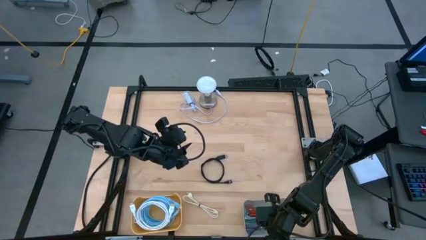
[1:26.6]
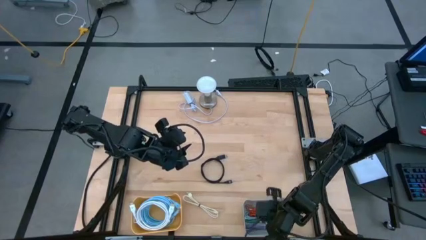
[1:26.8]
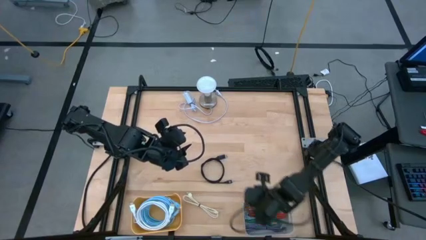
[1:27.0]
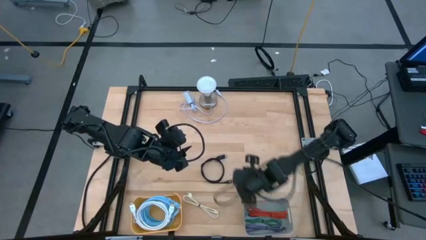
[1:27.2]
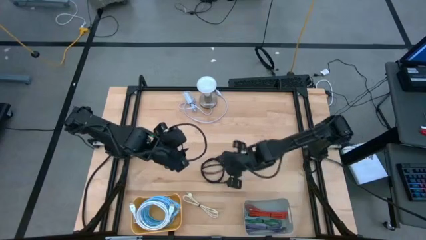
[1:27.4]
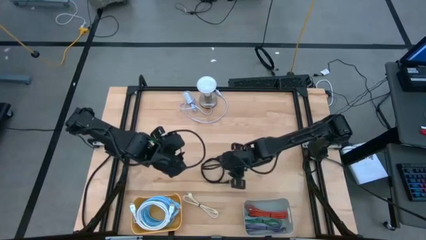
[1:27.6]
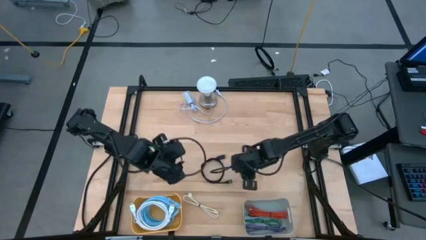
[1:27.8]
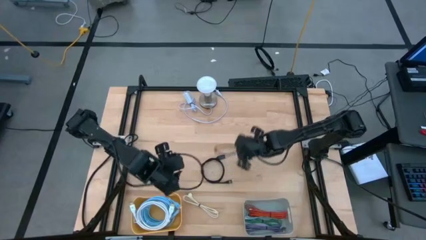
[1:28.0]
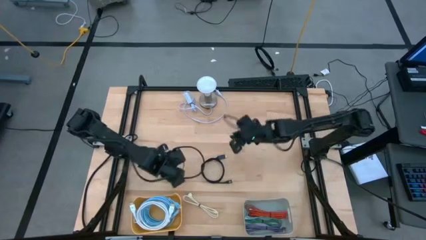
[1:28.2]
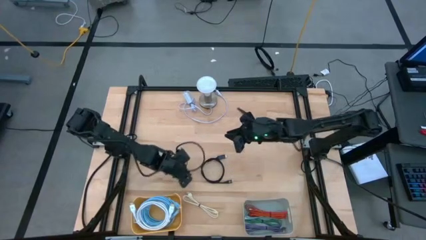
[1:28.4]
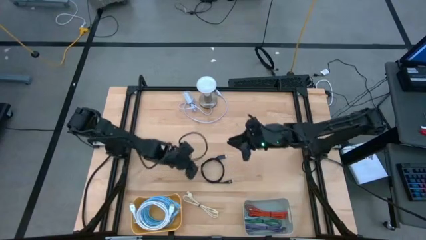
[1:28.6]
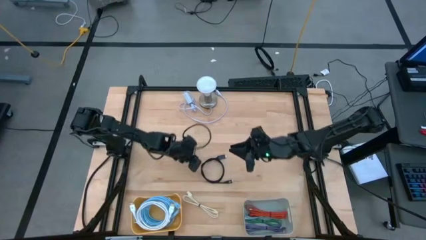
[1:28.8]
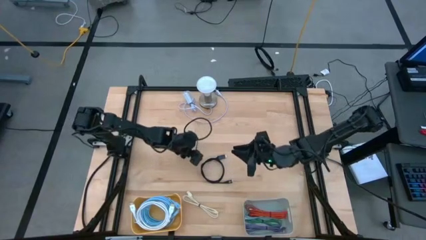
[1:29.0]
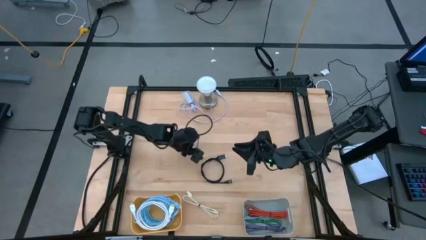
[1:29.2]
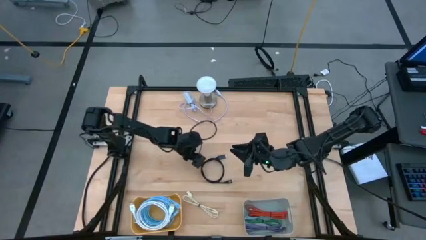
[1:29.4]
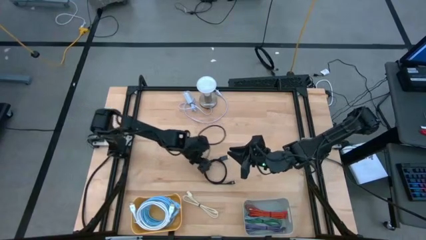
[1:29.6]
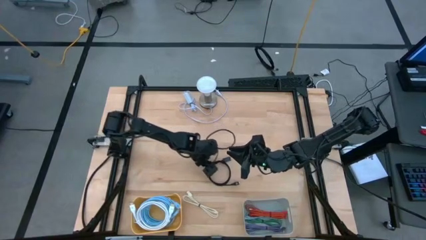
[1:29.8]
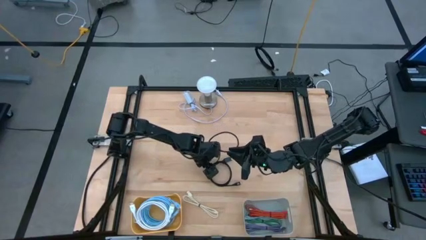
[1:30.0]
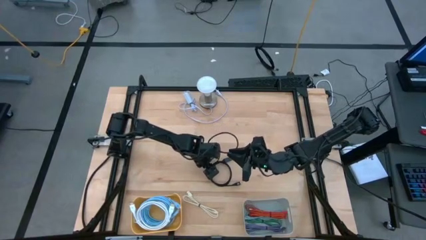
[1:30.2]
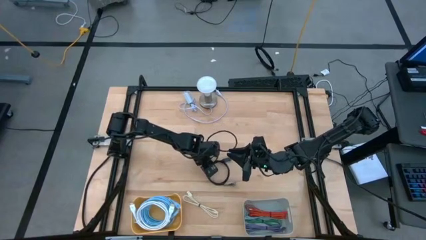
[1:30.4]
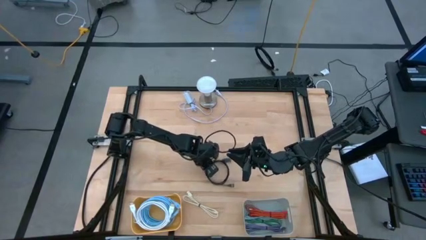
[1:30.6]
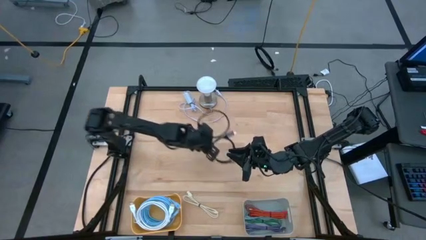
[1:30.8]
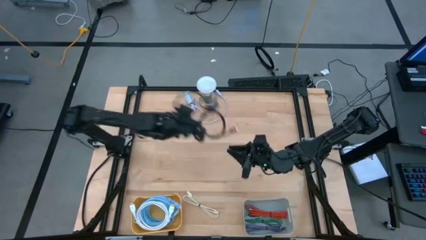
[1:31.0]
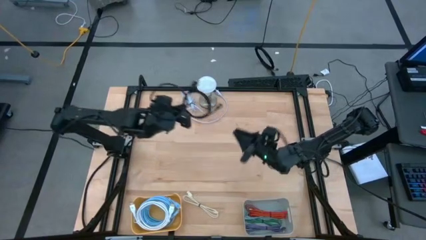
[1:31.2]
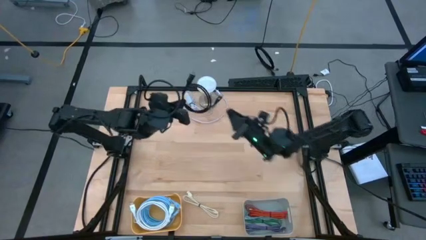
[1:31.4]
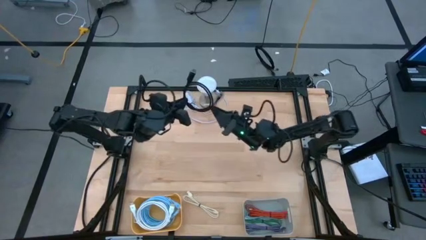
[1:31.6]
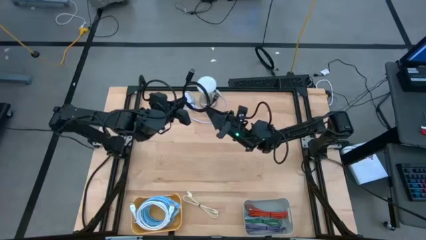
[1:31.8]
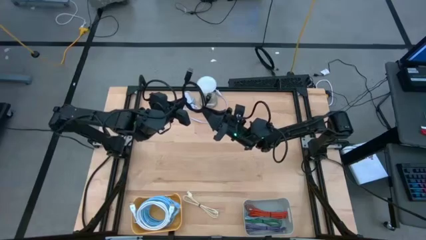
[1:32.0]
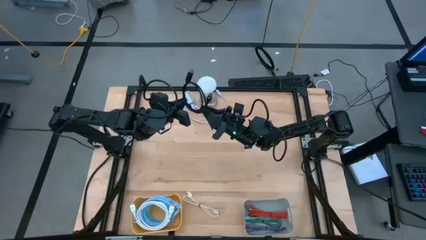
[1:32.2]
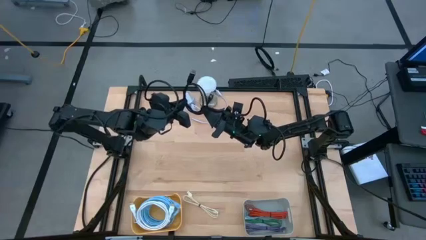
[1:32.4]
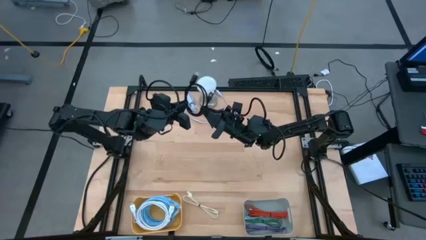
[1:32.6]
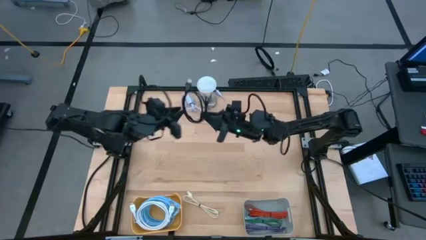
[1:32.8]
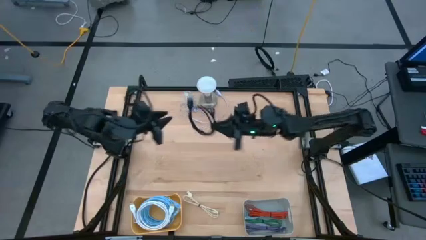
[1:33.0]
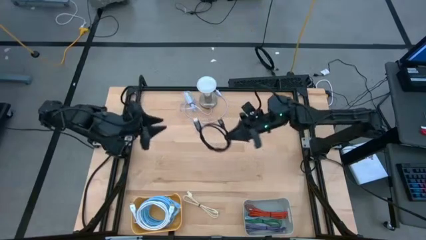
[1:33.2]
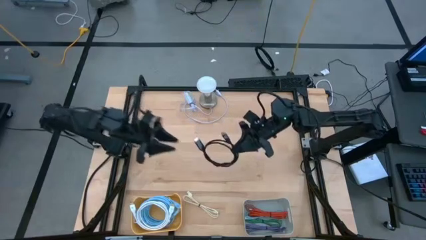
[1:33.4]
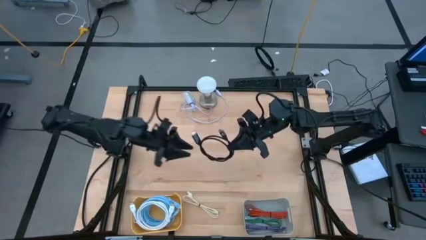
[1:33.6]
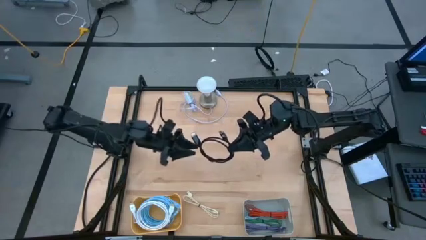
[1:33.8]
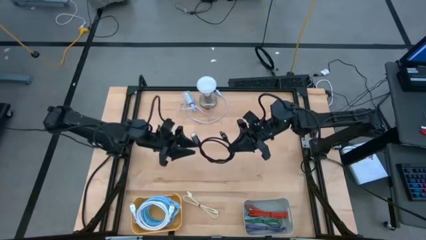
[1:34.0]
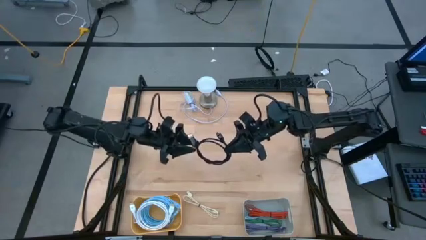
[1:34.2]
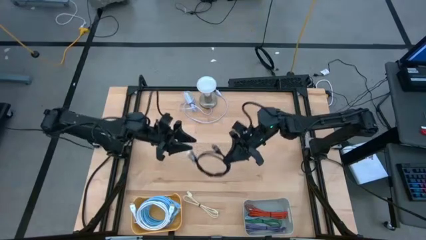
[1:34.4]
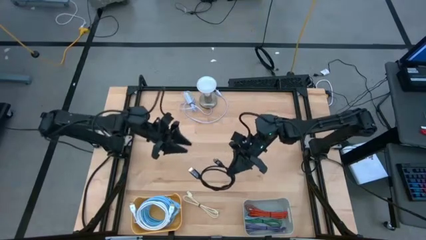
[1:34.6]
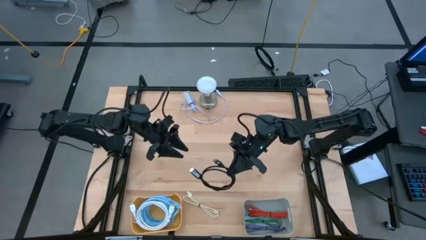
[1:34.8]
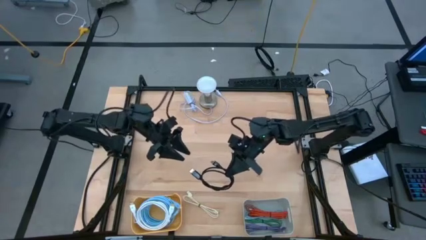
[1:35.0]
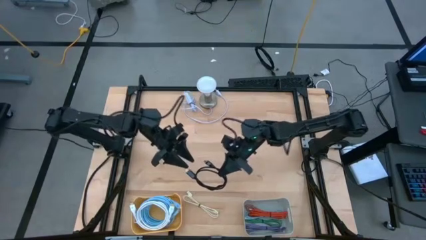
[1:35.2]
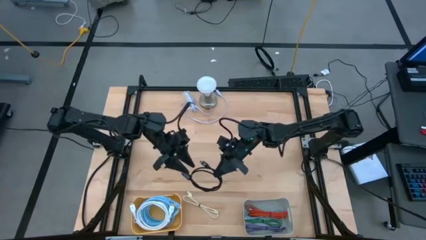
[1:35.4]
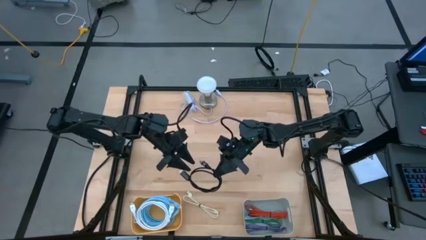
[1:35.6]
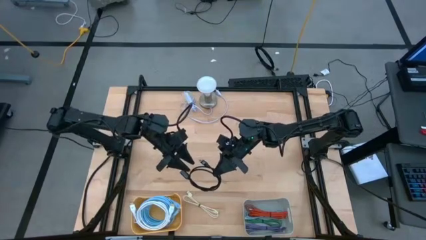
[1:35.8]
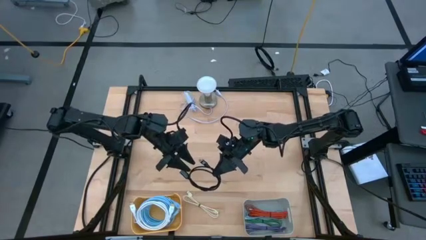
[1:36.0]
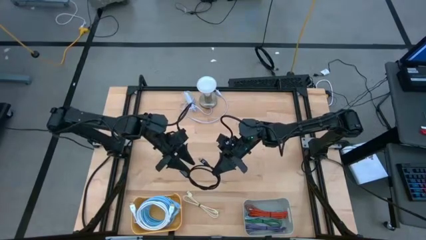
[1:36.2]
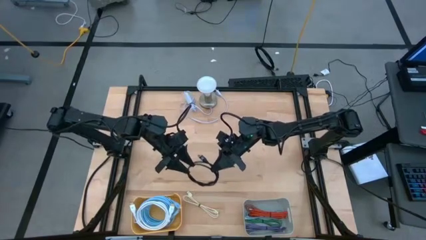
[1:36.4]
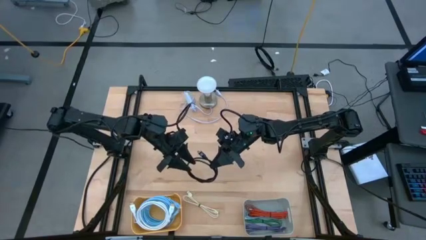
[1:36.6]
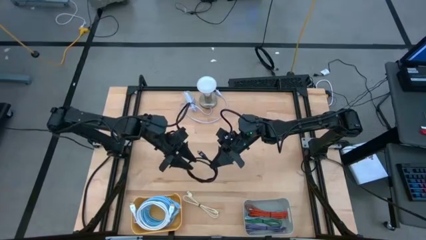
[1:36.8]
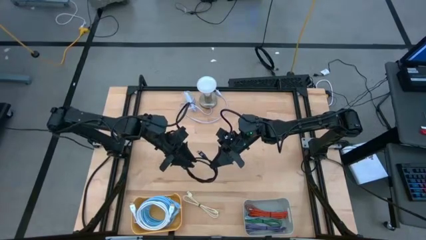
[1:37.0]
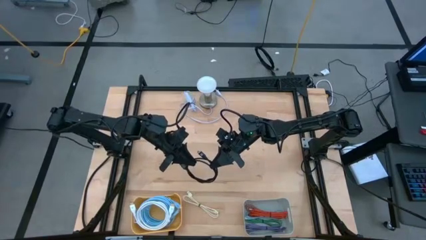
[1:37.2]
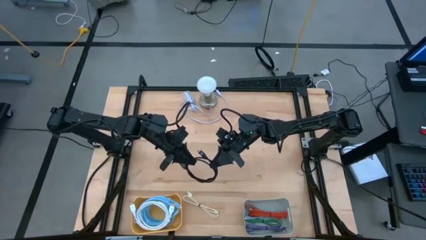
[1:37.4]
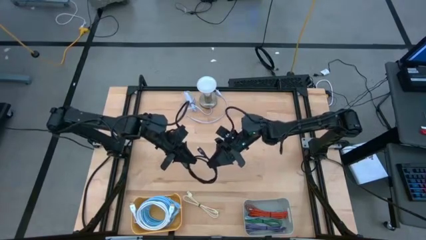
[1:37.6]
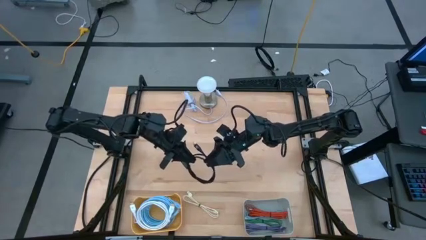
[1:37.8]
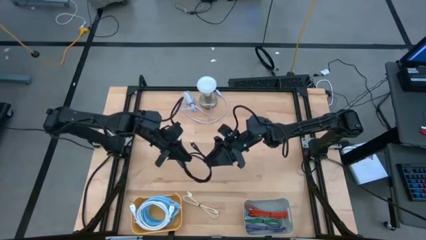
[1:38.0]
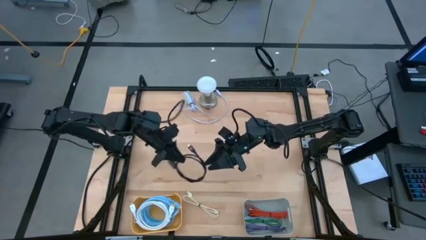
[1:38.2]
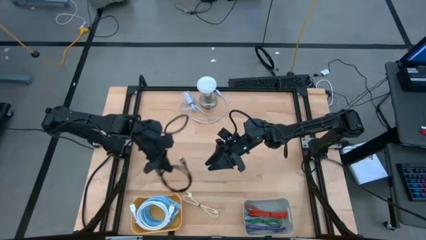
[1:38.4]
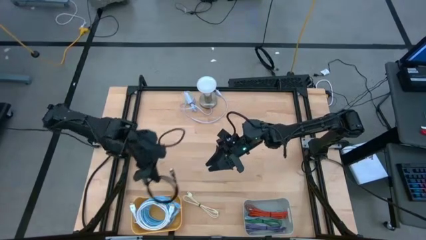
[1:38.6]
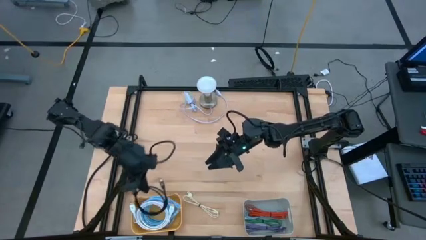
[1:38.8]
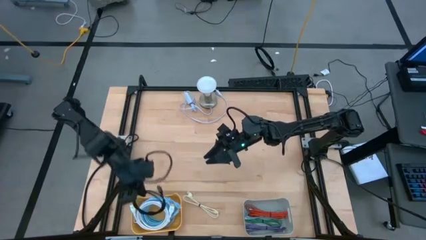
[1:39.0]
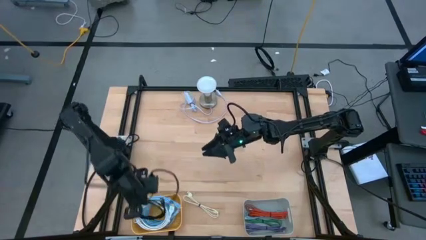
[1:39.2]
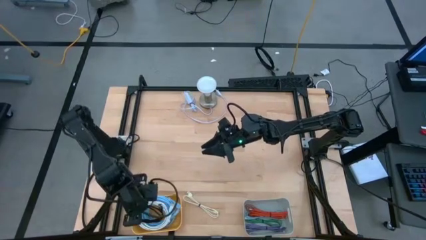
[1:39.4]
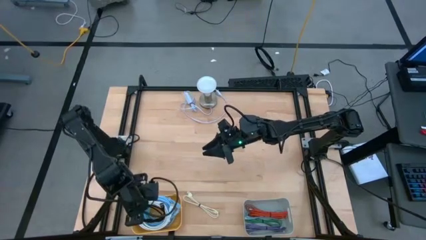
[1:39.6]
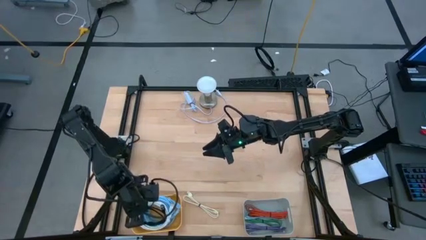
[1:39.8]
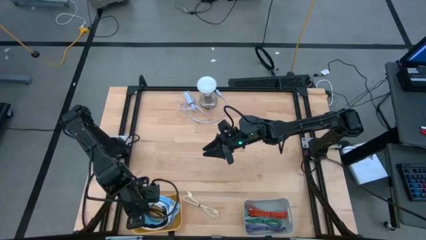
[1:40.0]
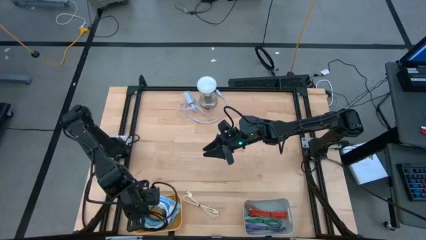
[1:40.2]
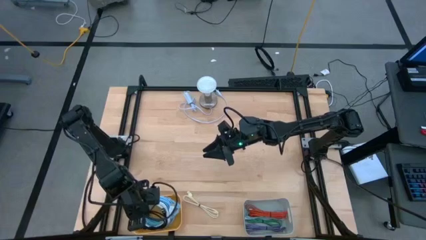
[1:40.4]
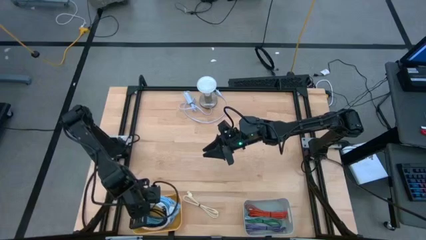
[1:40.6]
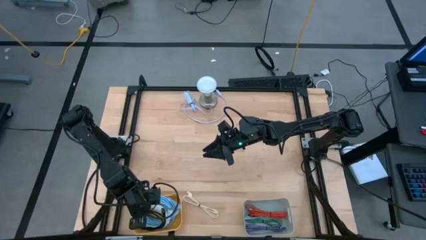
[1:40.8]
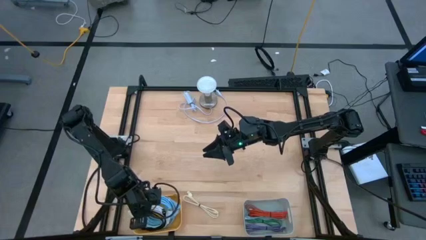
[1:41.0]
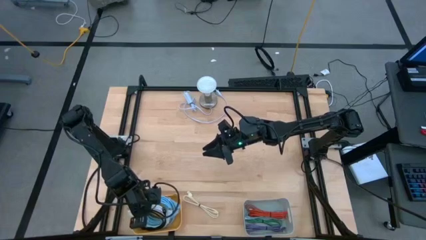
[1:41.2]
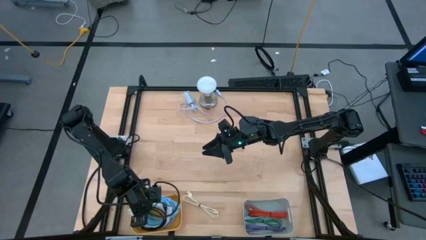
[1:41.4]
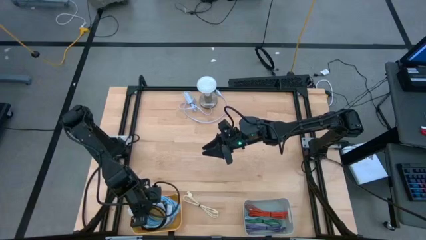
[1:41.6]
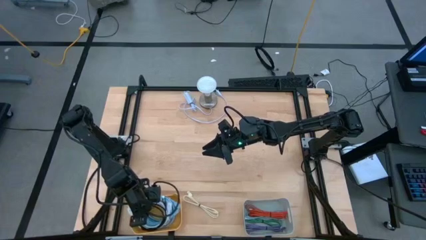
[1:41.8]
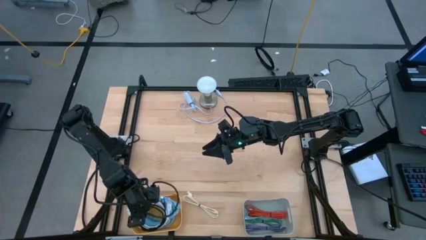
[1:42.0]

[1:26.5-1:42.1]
Task: Pick & Place USB Port
Put the black HDMI cable into the orange bin

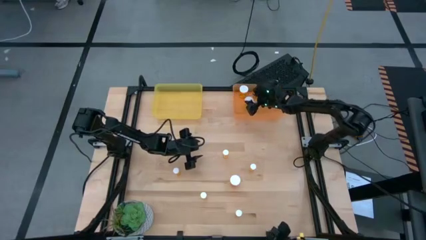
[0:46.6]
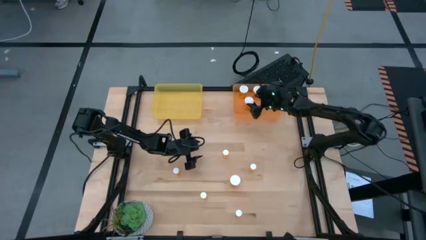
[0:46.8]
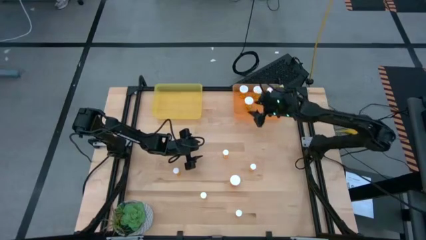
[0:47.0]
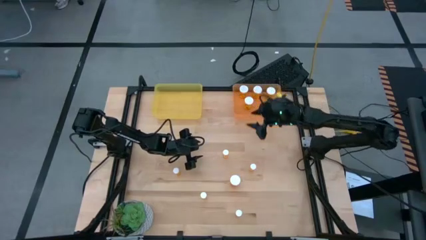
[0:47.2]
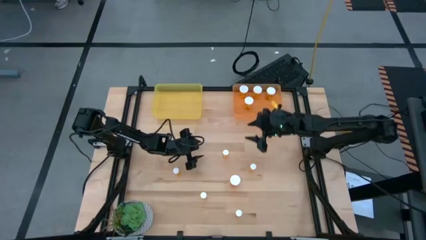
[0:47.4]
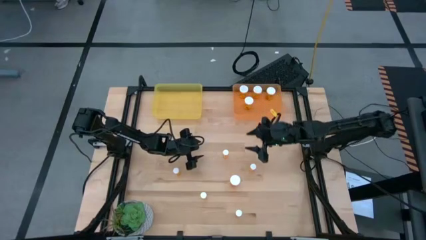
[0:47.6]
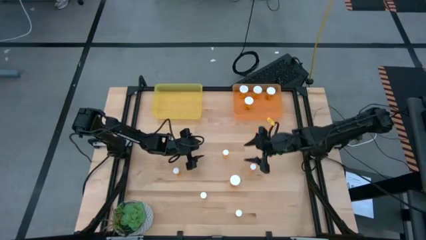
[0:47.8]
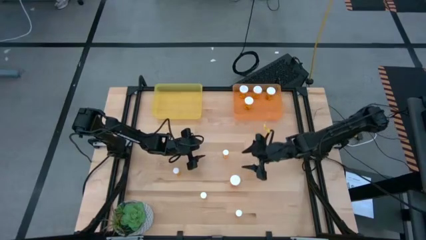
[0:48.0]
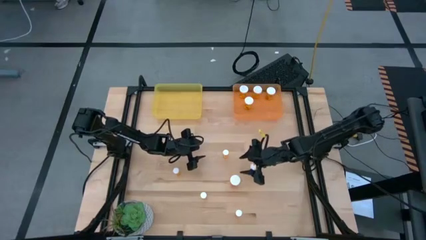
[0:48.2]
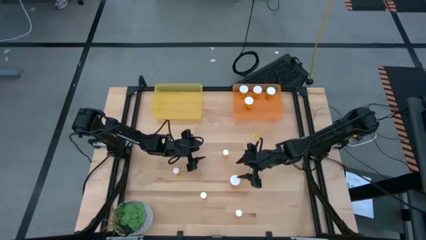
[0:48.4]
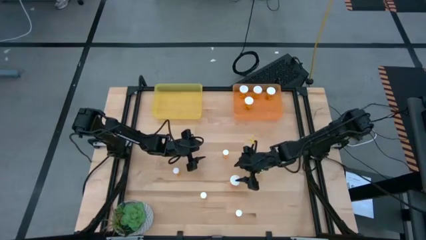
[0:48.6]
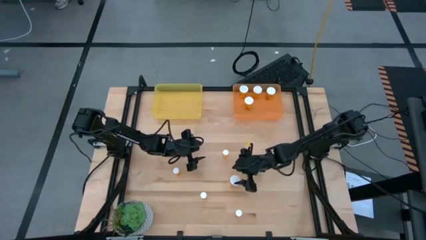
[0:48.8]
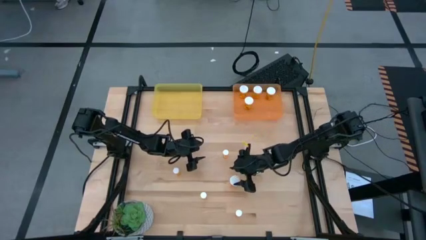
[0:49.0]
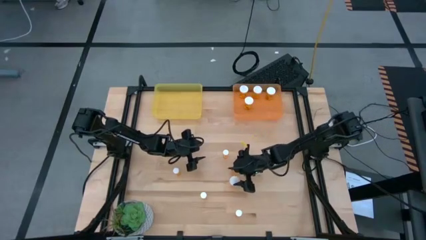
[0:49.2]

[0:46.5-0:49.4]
Task: Pick and place medicine bottles into bin by pill shape (circle, oval)
Put the big yellow pill bottle into the transparent orange bin
